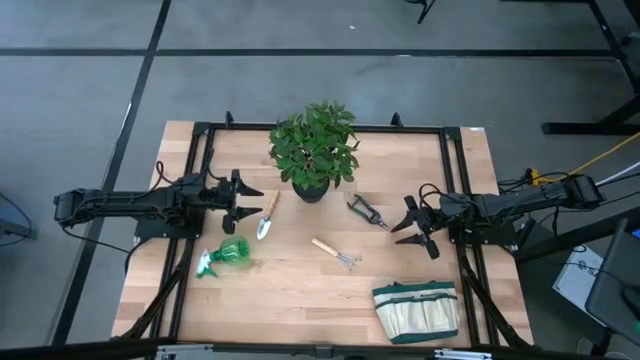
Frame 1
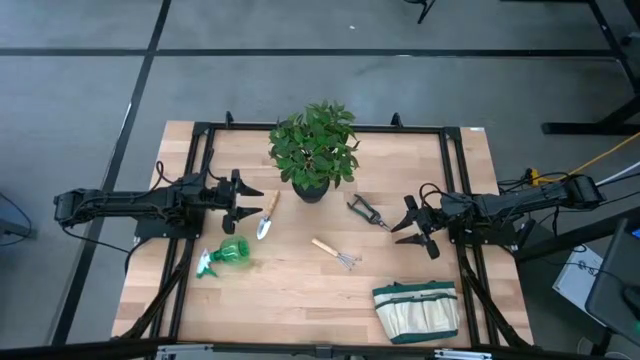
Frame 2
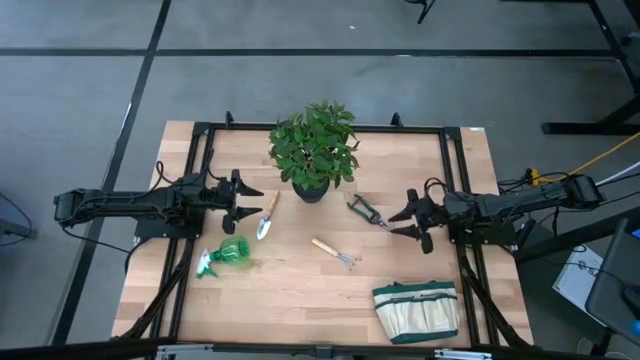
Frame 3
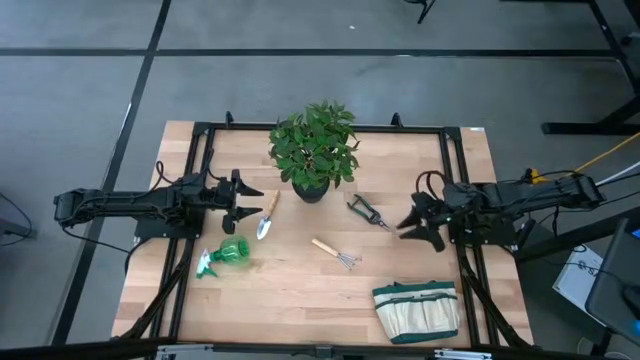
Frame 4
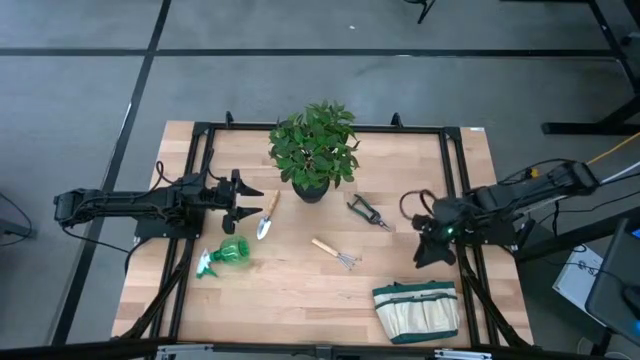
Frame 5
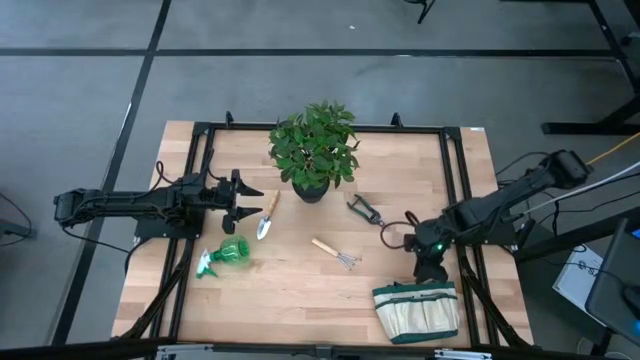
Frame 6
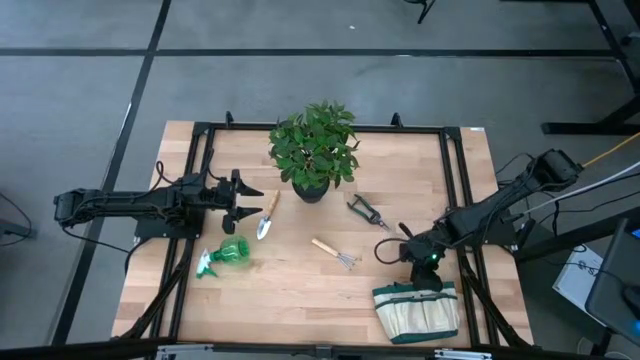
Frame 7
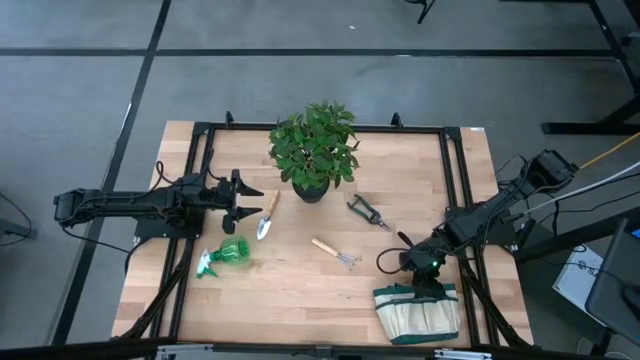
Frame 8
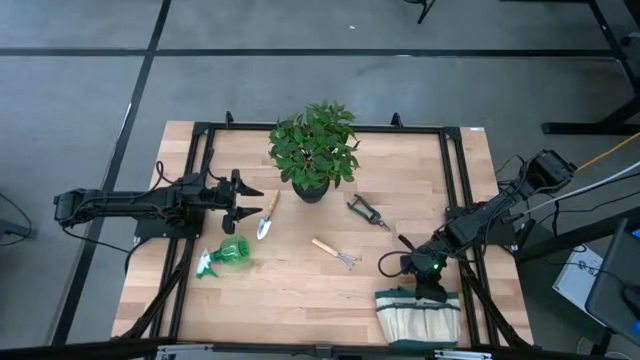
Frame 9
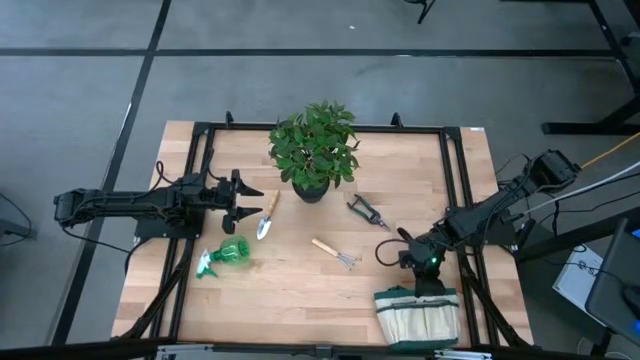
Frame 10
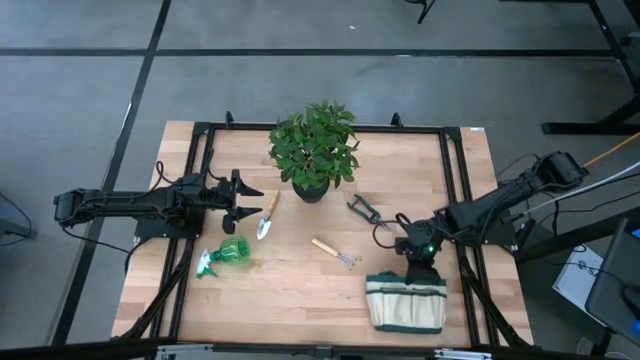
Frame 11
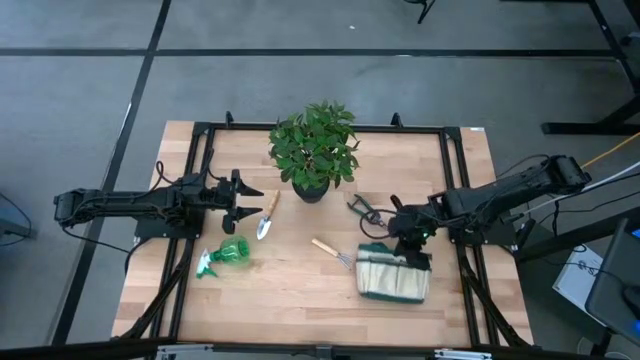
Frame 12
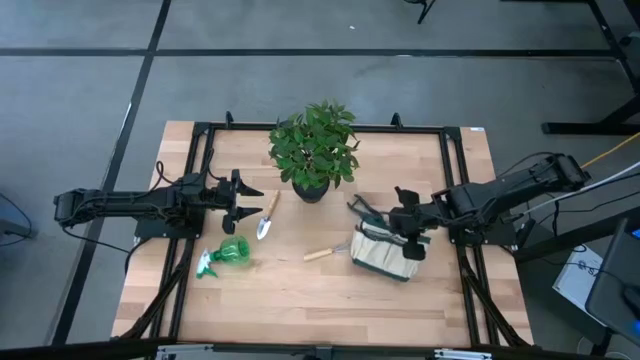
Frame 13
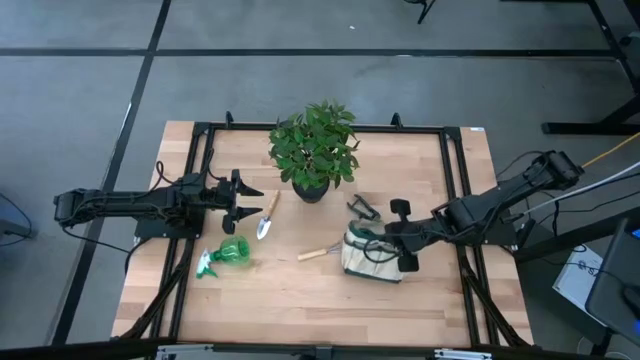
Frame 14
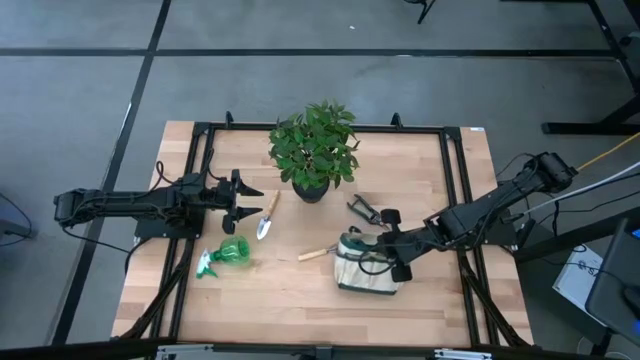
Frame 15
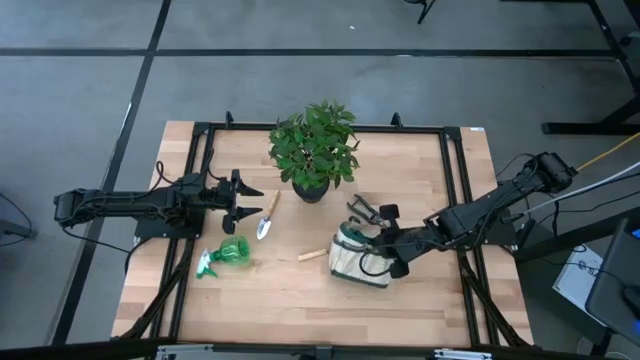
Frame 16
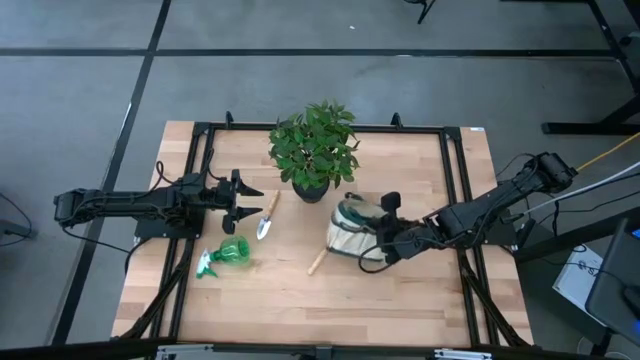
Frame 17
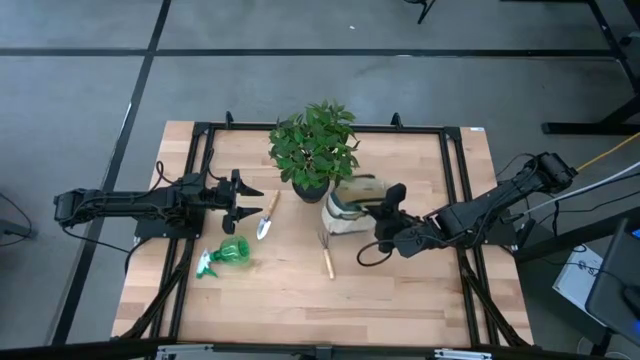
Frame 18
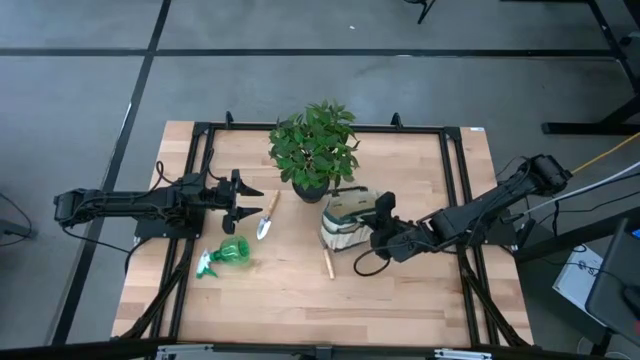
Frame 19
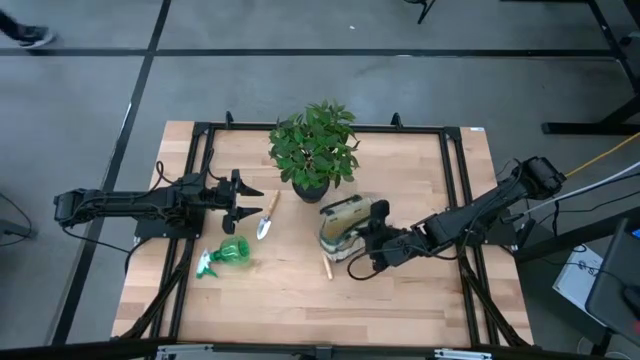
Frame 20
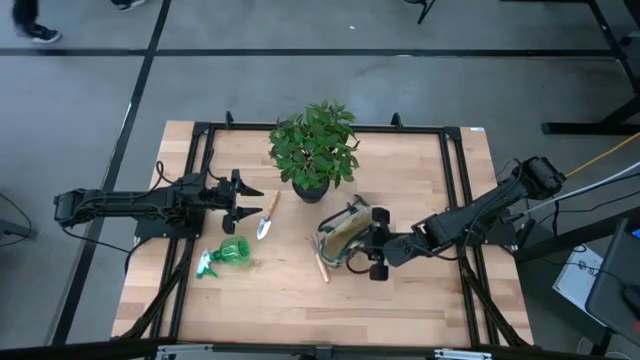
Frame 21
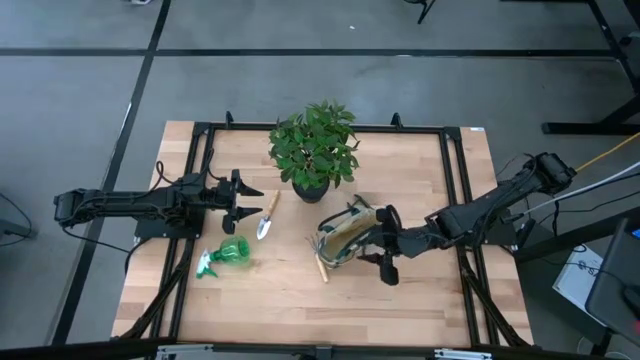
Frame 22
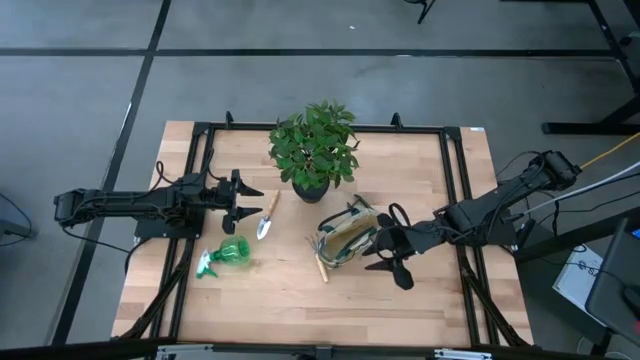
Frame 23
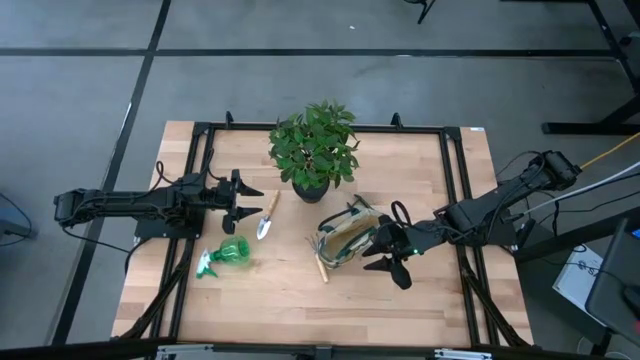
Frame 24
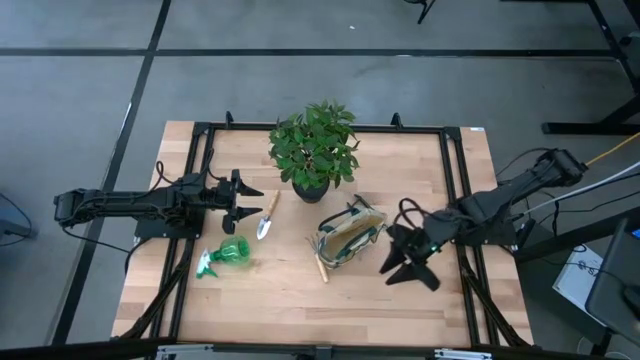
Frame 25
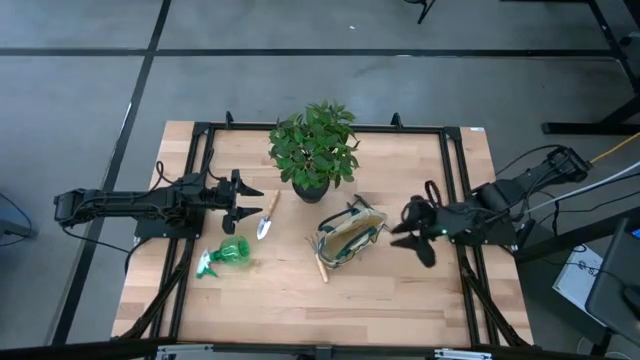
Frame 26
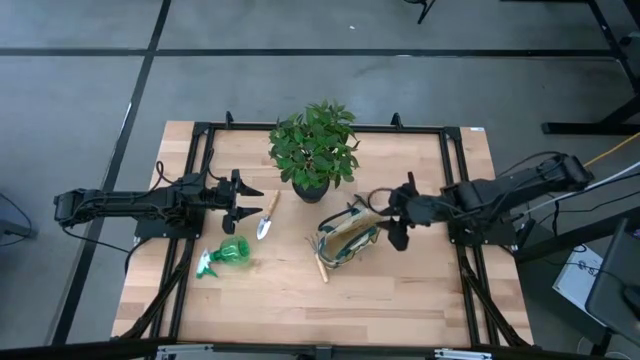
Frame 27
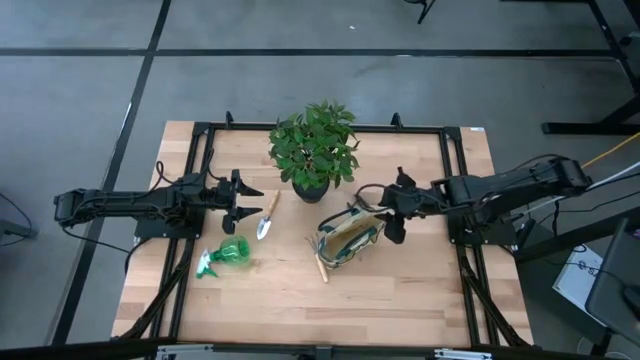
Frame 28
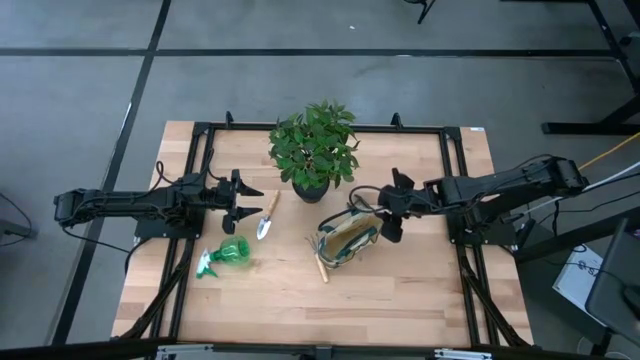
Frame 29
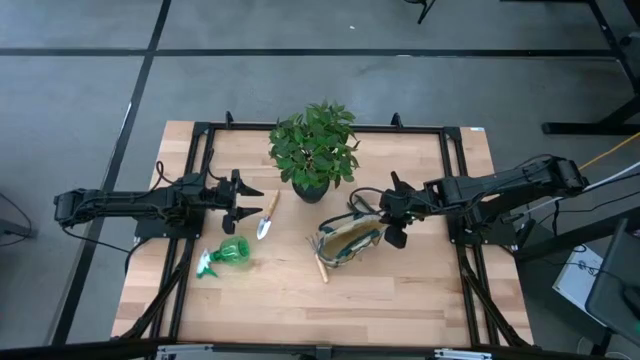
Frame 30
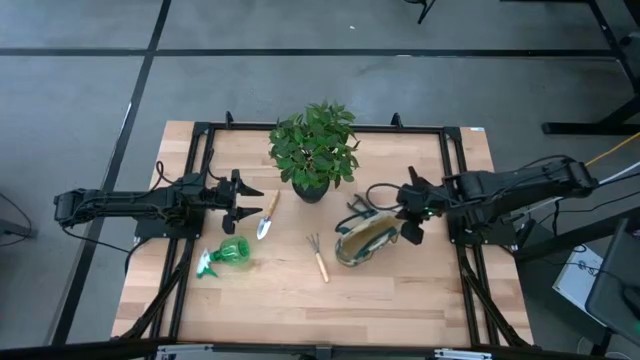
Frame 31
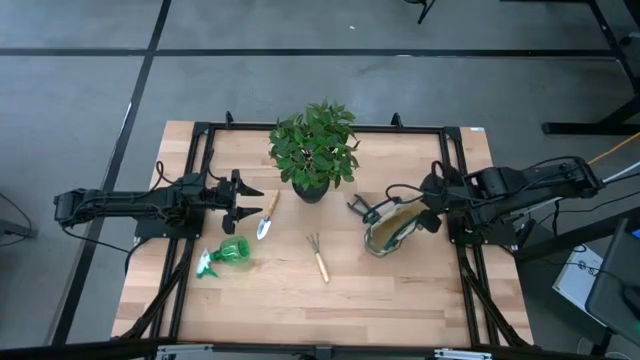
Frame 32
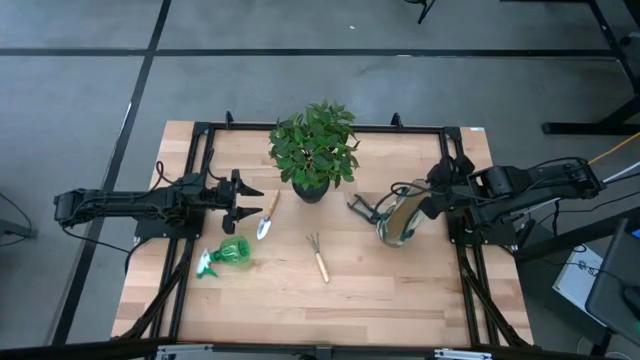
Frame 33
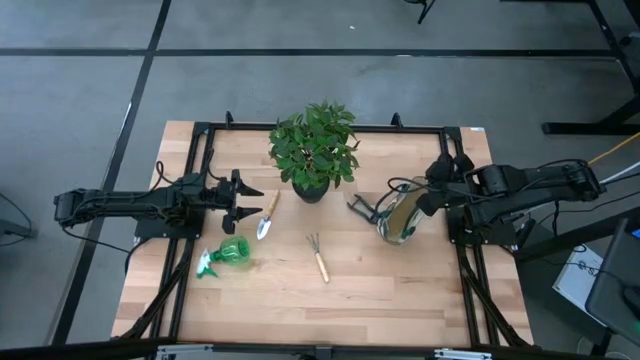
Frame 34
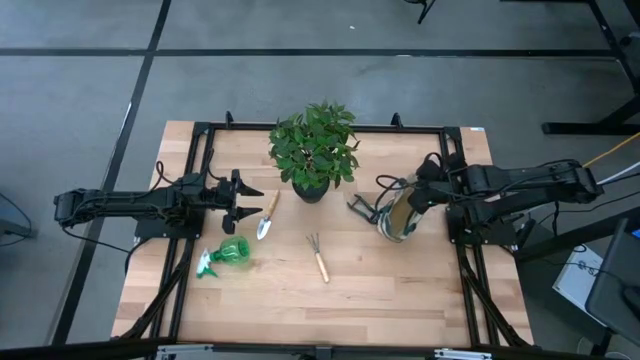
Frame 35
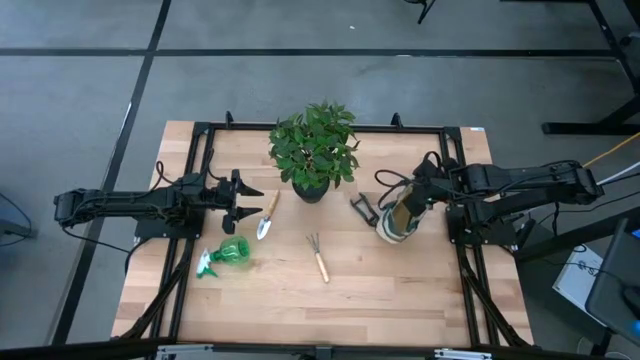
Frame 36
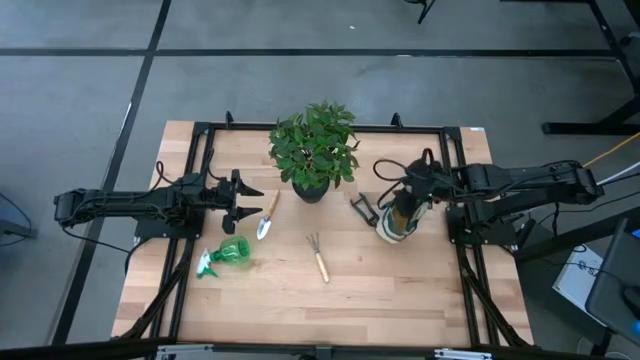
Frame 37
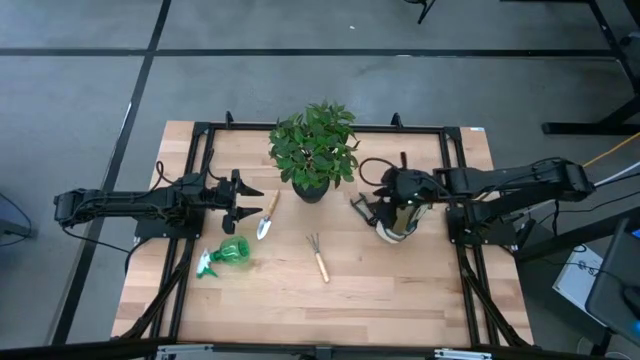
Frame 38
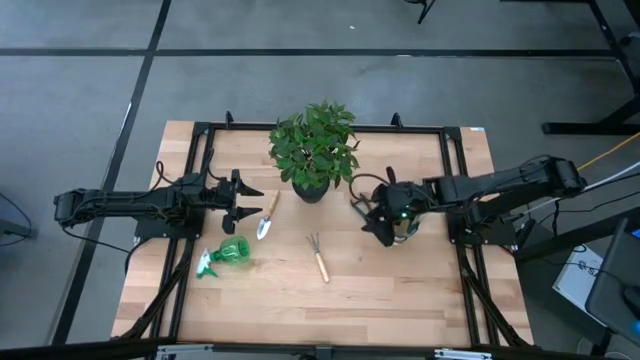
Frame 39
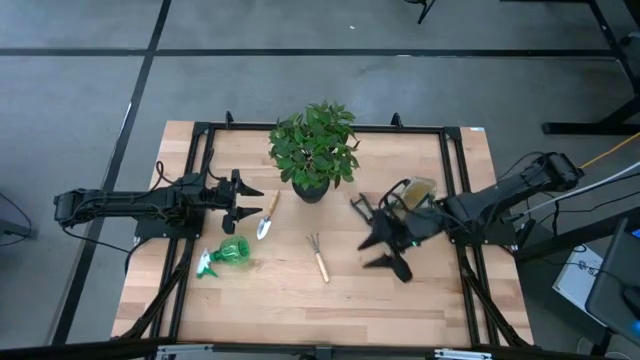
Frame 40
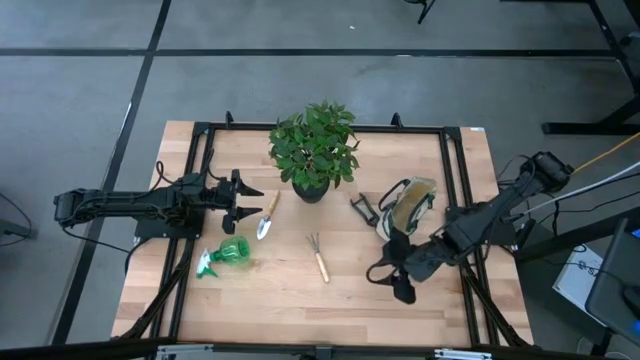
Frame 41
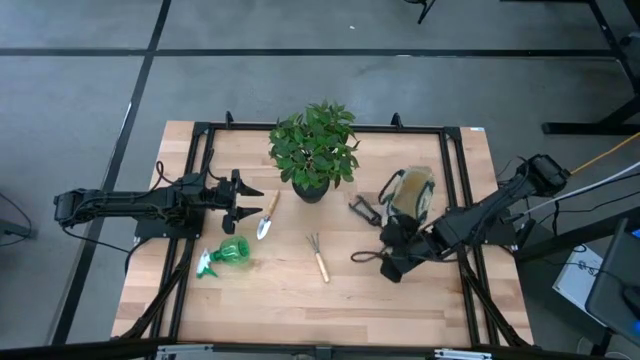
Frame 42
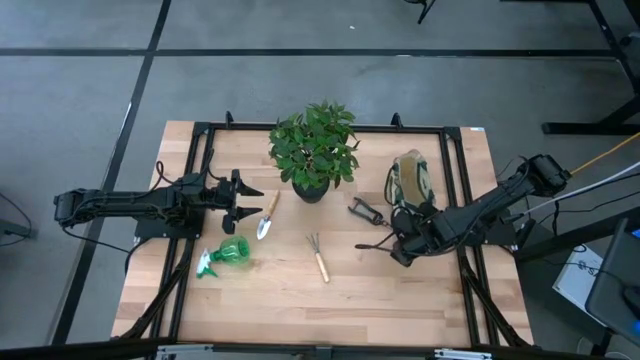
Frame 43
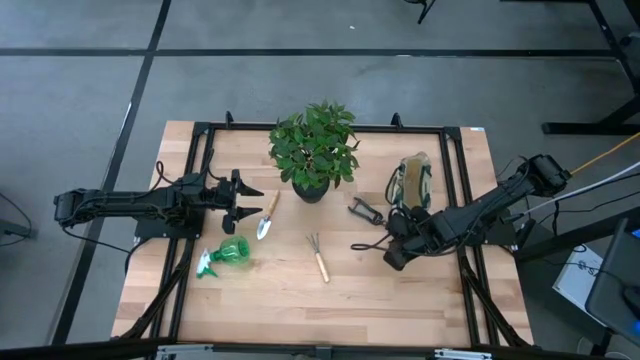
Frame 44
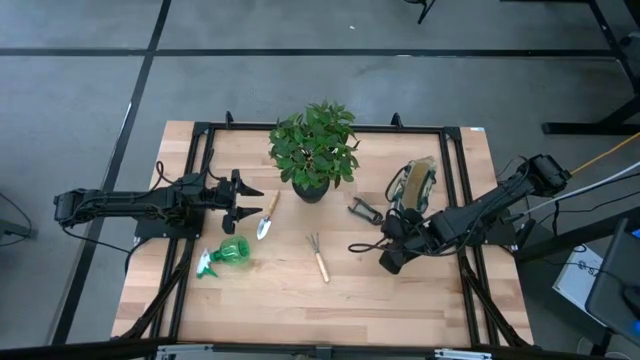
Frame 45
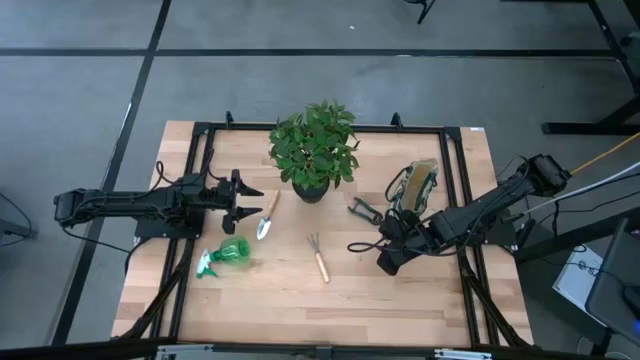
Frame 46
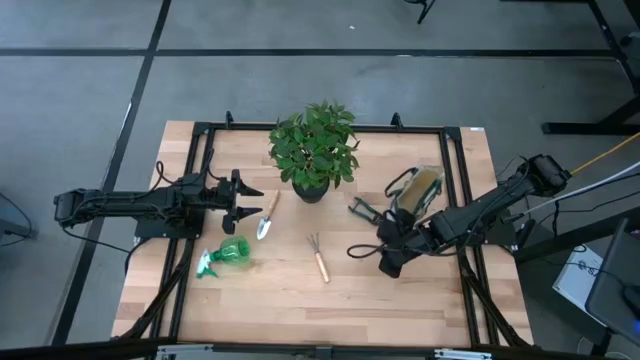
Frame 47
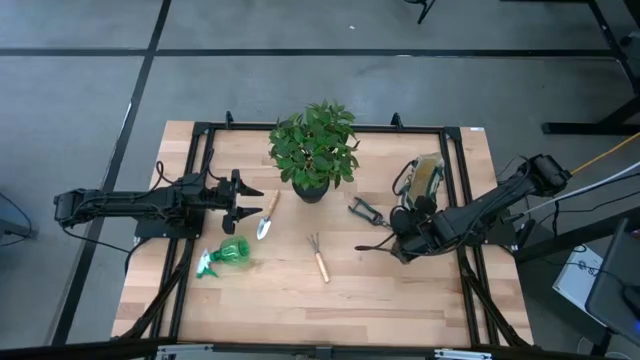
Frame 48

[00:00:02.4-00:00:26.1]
Task: Pick & Place Garden tools in Gardening bag
Prepare the white gardening bag
